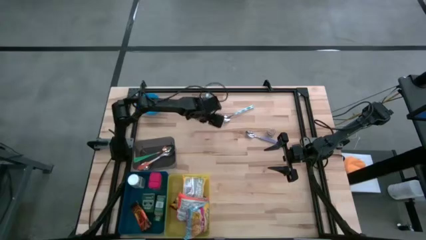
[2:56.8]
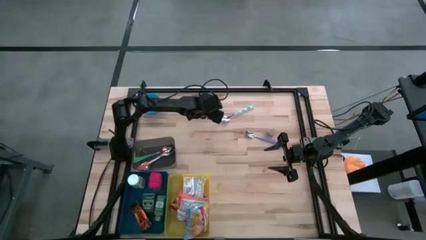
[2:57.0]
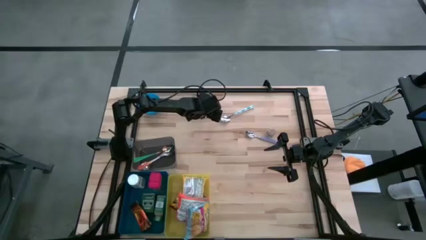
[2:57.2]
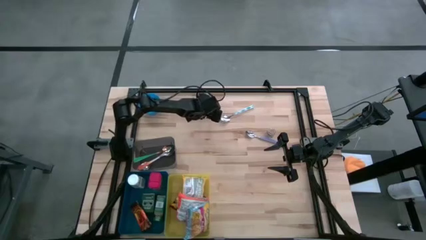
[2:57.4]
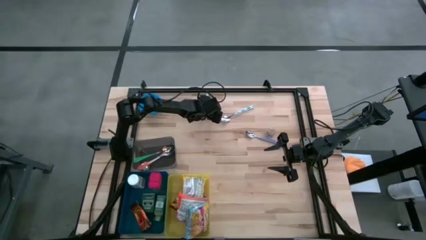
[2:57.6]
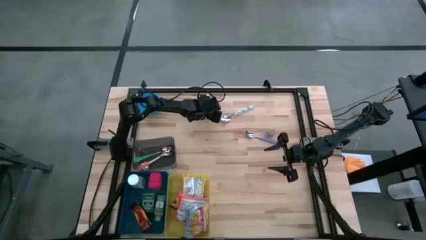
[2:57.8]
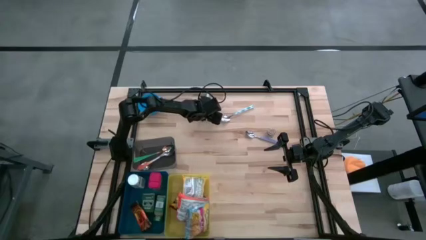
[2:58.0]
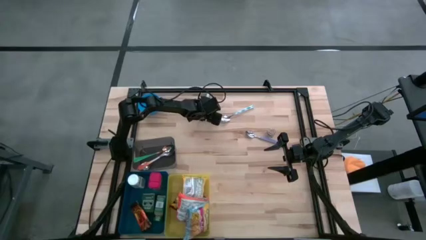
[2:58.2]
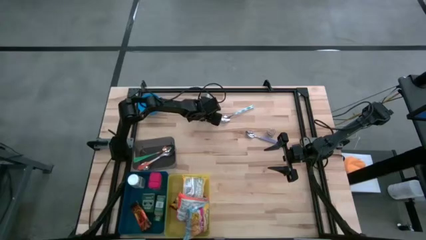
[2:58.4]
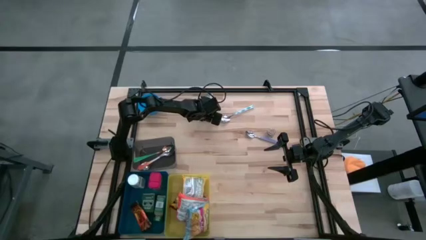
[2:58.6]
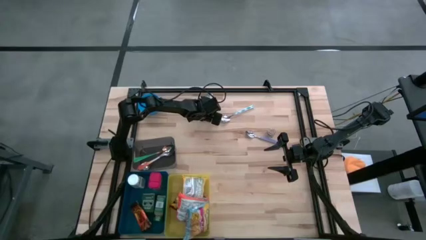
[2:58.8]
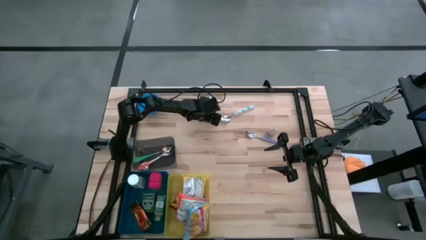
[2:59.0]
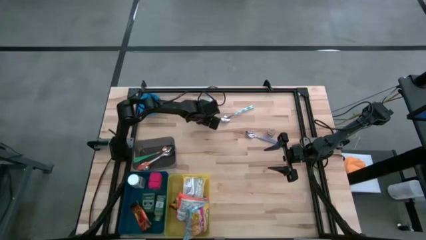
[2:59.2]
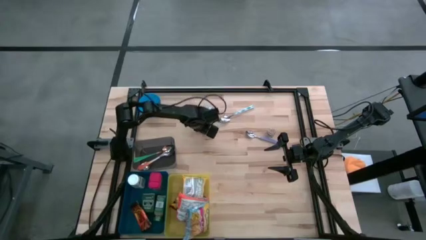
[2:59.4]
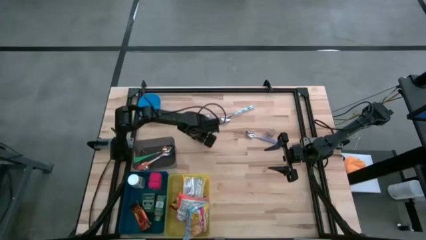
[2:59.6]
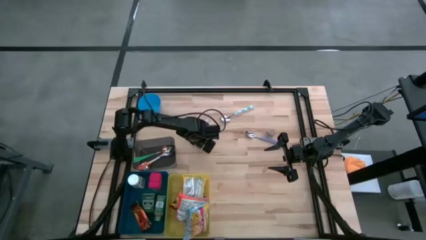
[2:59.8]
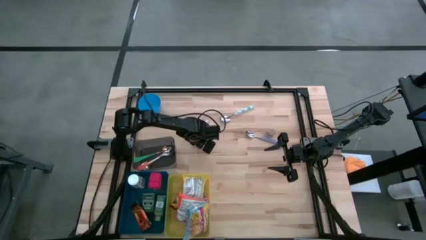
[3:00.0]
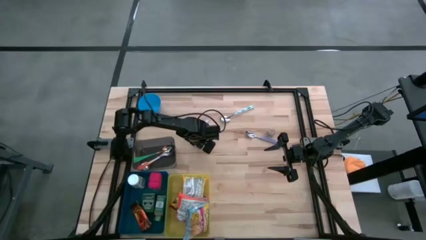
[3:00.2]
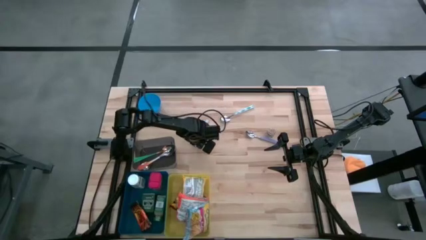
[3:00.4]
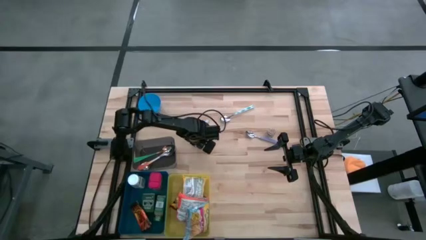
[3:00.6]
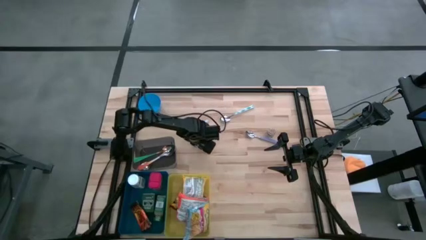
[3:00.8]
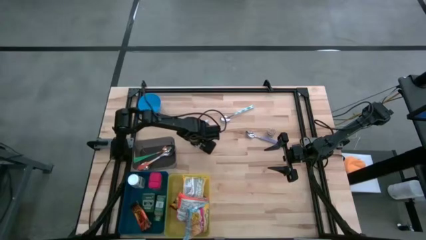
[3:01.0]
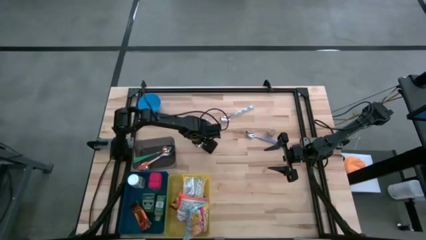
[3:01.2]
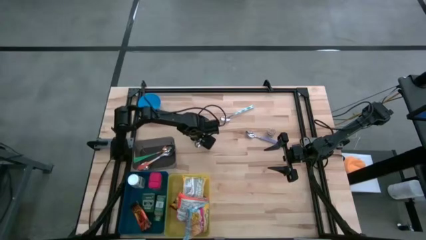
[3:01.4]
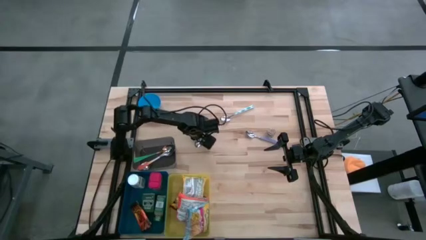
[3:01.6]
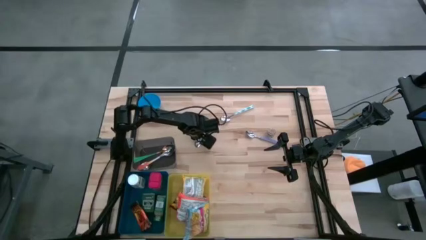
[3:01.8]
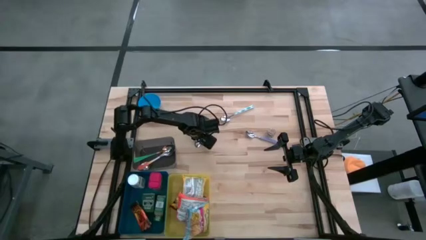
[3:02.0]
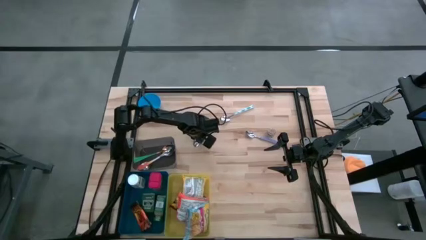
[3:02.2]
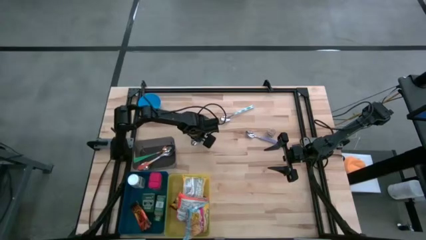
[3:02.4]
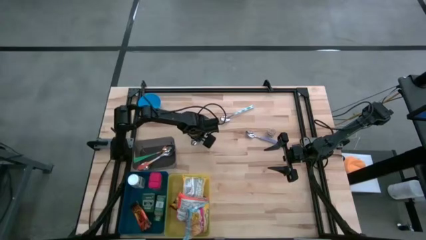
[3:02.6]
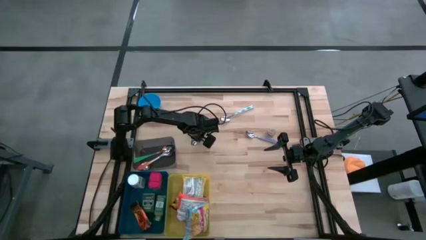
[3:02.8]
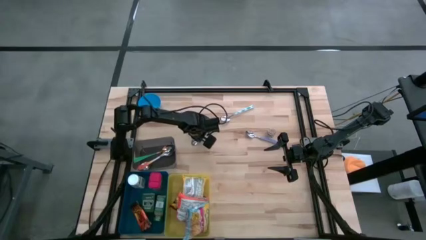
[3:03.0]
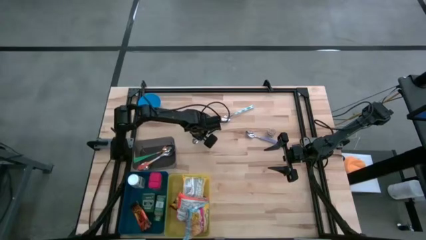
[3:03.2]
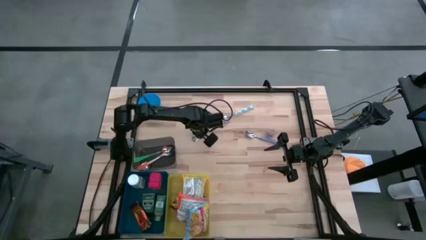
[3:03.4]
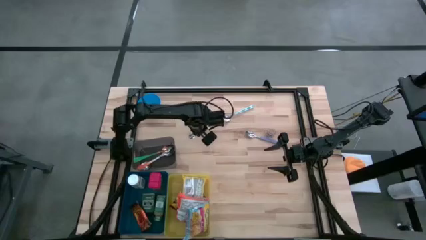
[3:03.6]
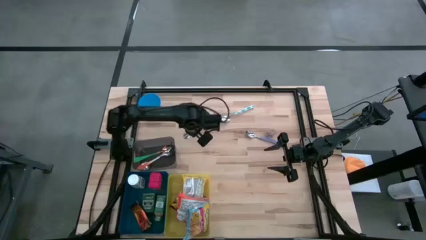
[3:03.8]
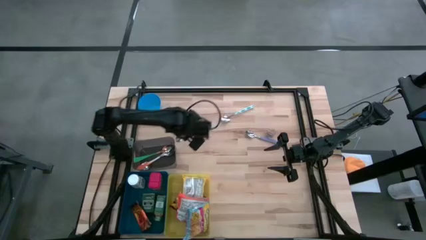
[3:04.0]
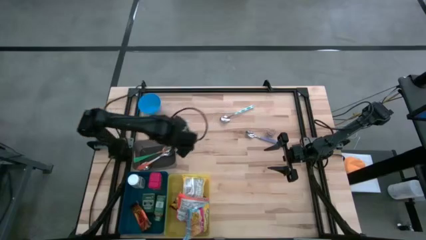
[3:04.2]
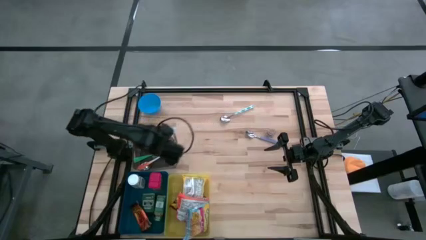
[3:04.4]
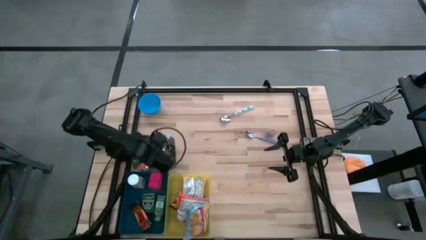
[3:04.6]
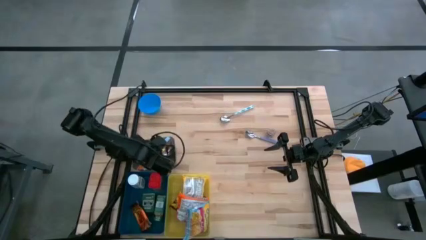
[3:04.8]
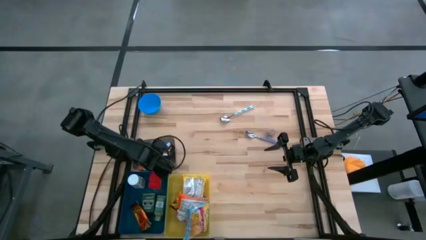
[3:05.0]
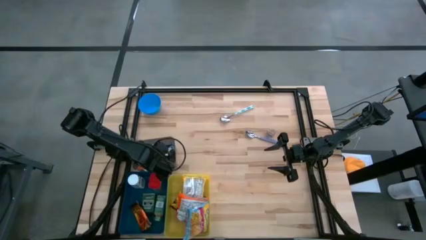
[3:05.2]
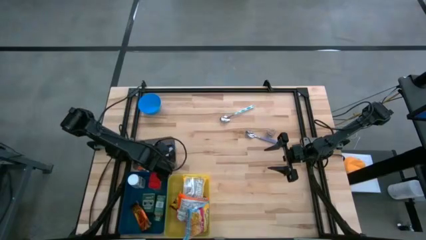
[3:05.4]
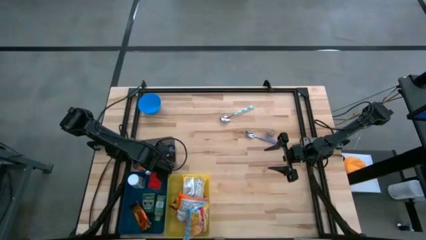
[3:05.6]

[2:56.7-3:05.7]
Put the blue spoon into the gray bin

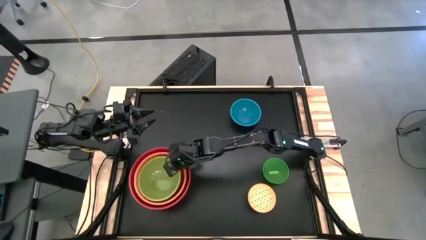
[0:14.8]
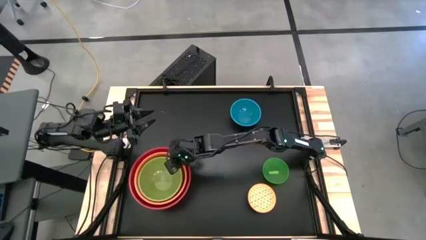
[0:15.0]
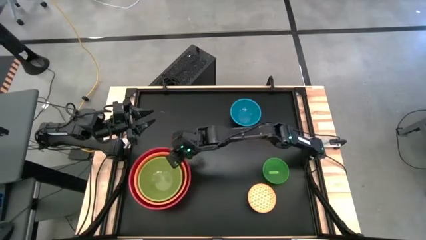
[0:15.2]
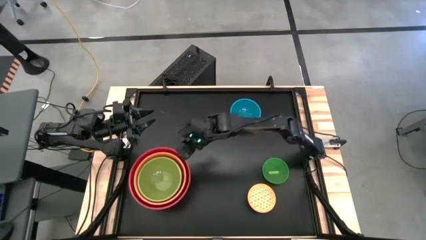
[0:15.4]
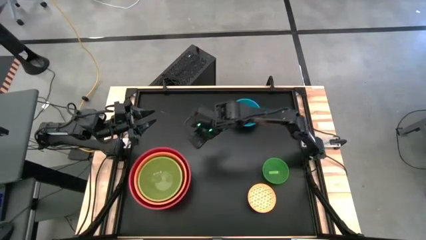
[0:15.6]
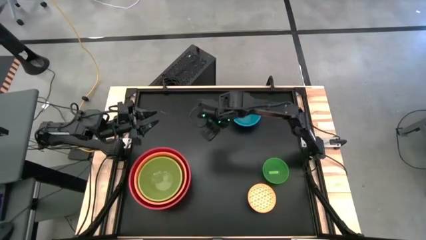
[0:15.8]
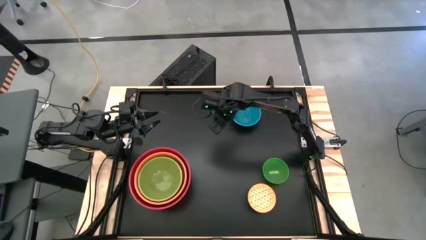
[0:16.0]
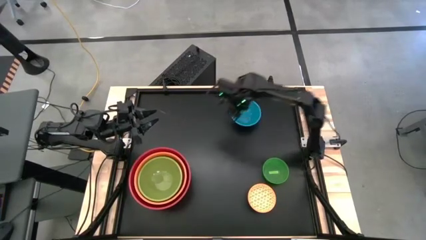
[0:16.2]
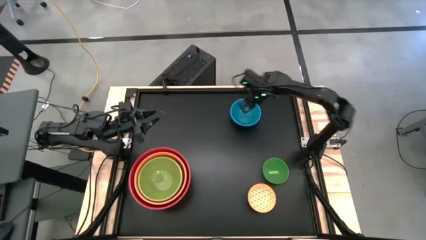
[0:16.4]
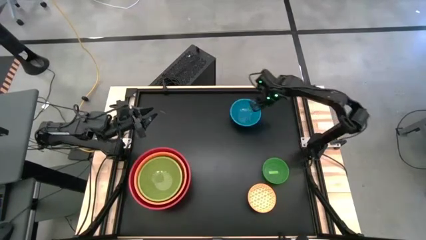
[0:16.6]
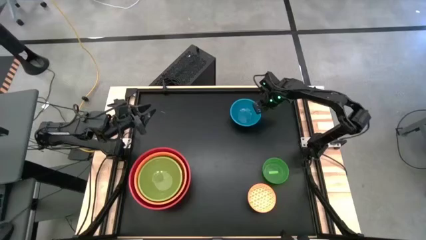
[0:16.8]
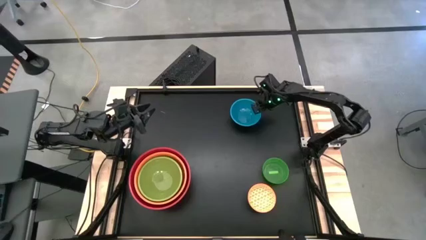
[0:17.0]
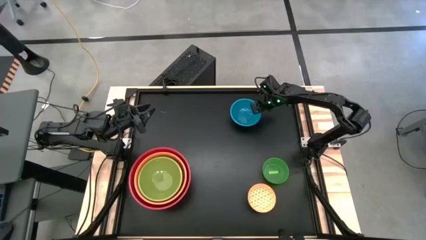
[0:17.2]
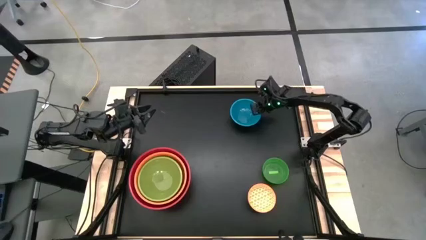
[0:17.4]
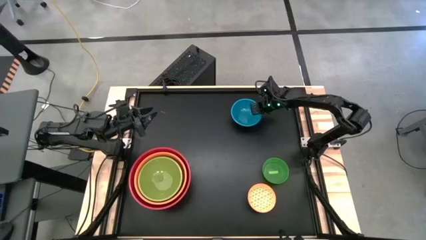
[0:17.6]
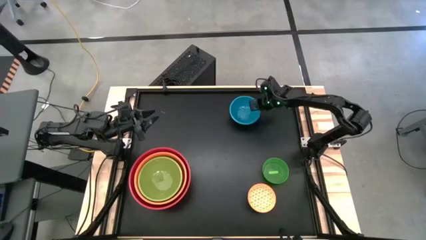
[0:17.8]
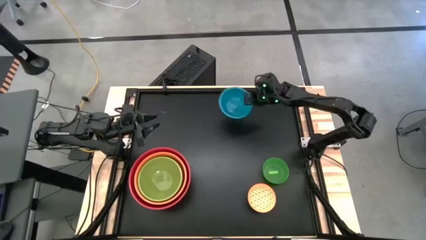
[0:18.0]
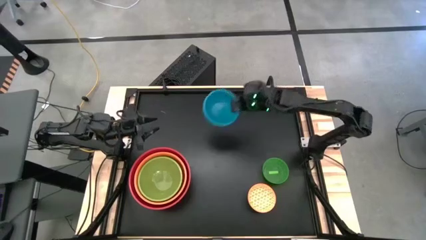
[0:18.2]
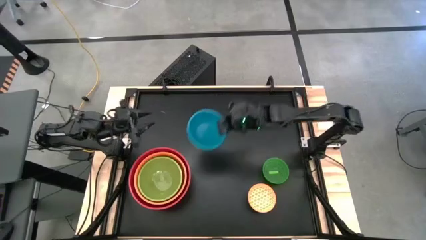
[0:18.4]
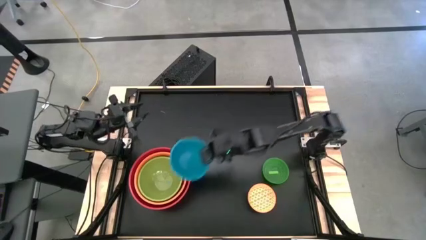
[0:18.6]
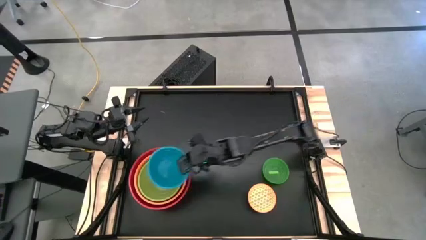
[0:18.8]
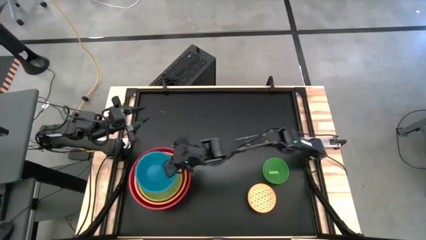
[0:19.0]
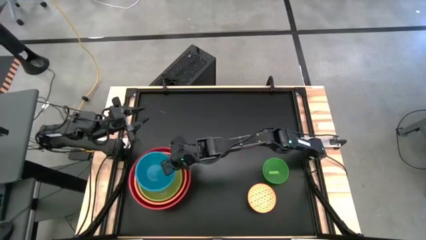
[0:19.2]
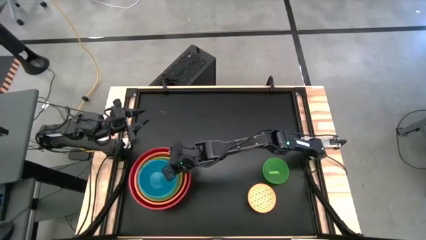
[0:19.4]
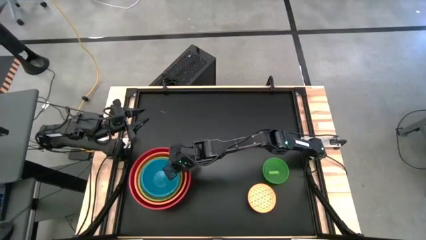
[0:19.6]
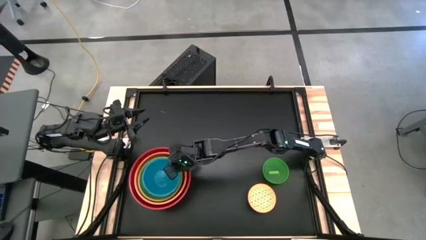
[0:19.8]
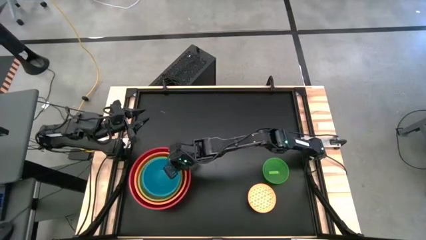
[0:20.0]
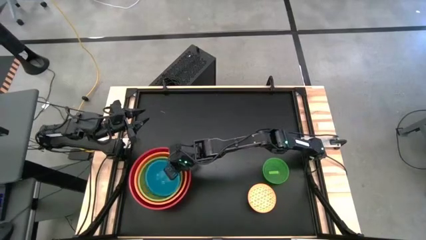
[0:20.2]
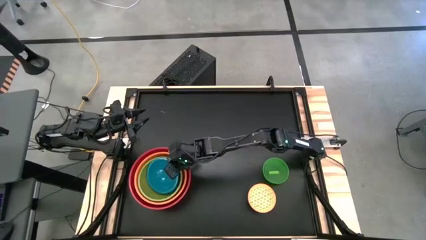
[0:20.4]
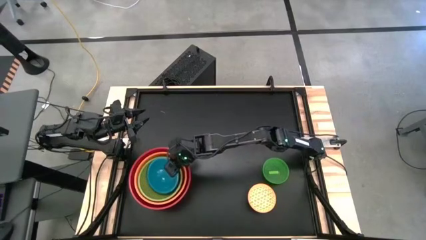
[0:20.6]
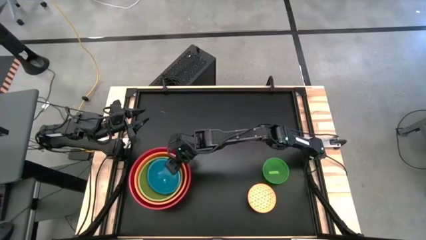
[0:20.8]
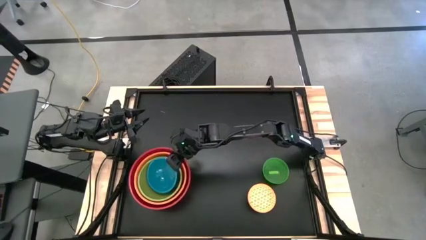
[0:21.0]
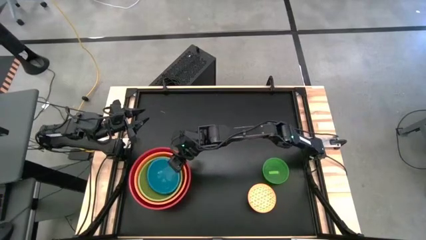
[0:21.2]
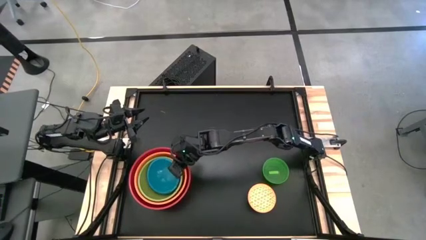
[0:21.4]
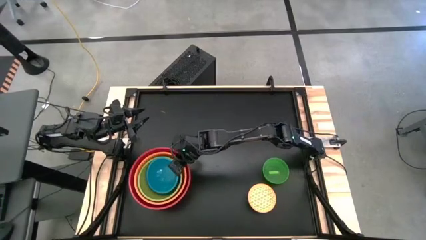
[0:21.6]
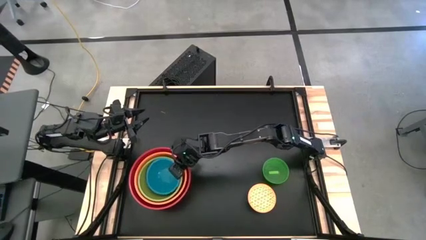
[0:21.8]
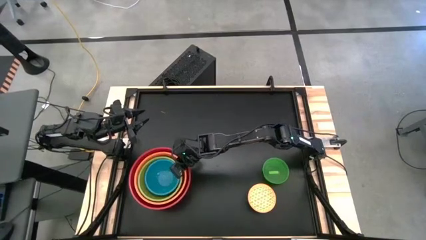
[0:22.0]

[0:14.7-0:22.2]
Stack the blue bowl into the green bowl
